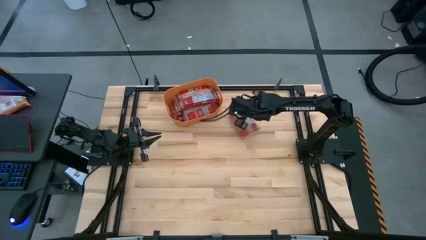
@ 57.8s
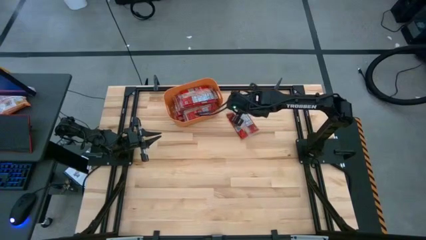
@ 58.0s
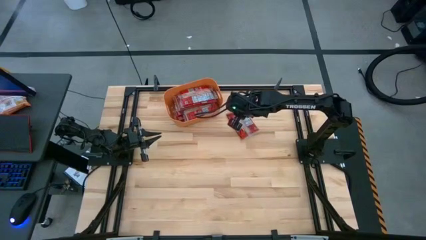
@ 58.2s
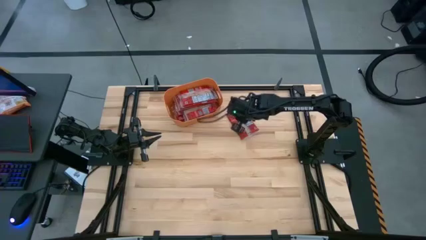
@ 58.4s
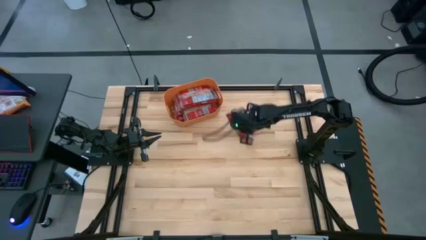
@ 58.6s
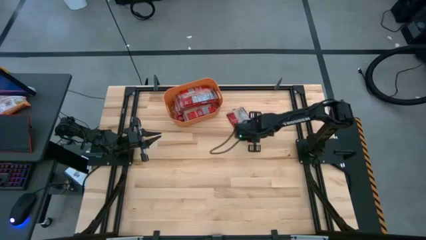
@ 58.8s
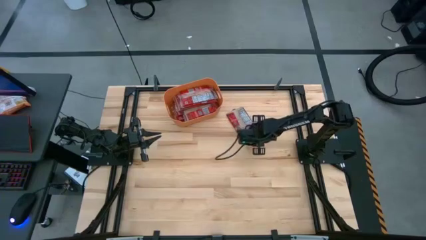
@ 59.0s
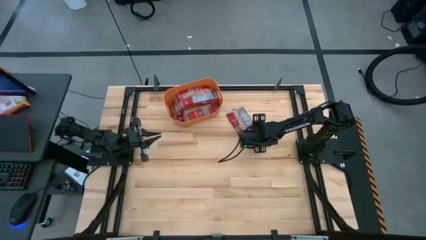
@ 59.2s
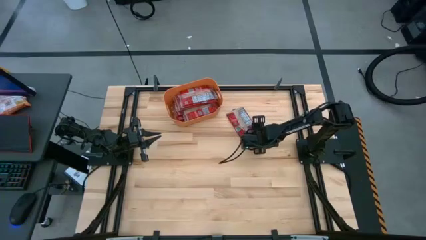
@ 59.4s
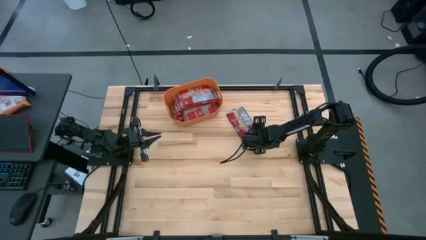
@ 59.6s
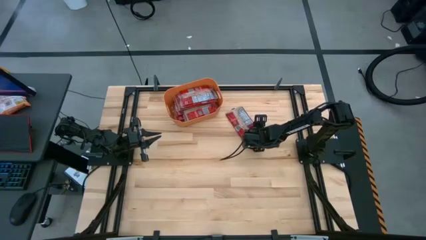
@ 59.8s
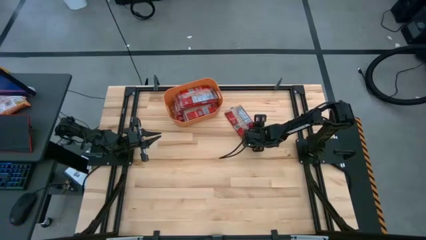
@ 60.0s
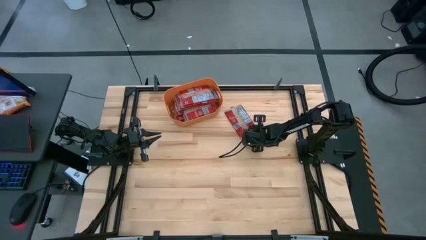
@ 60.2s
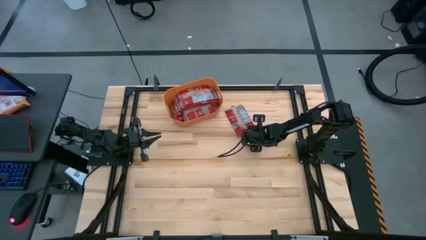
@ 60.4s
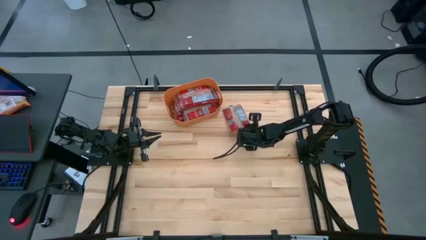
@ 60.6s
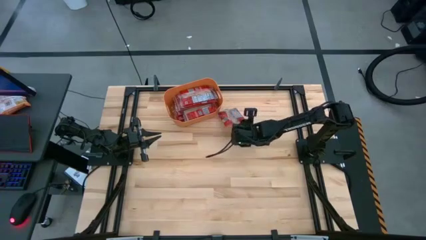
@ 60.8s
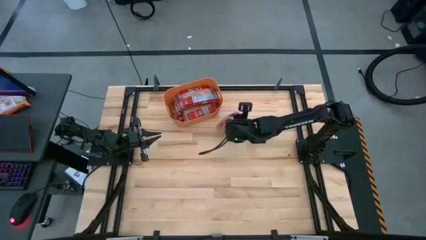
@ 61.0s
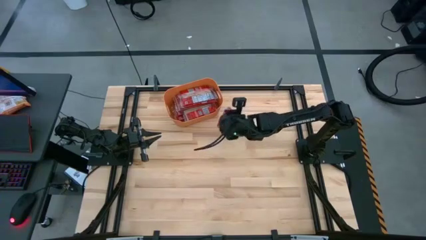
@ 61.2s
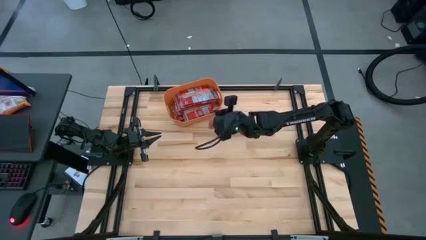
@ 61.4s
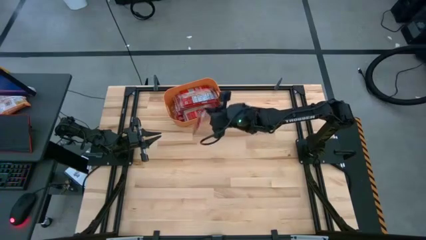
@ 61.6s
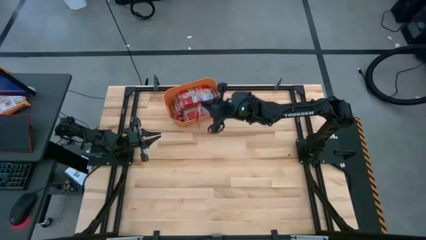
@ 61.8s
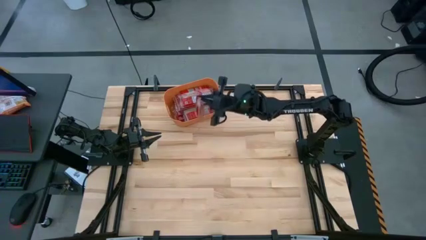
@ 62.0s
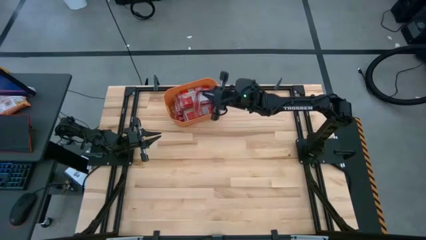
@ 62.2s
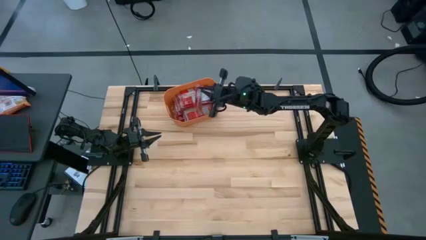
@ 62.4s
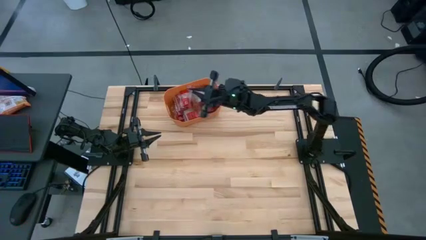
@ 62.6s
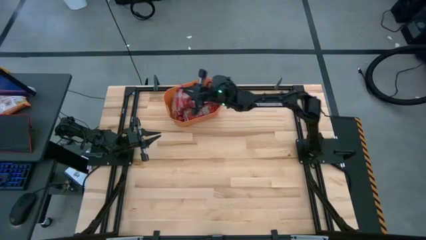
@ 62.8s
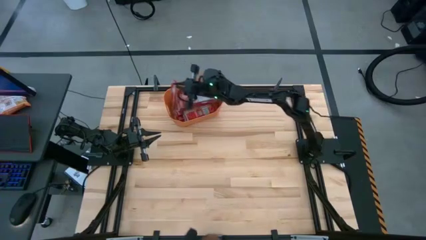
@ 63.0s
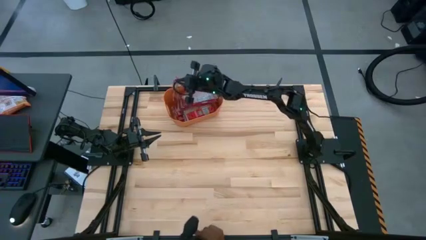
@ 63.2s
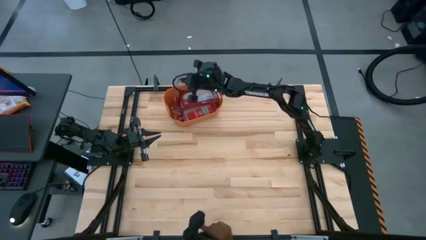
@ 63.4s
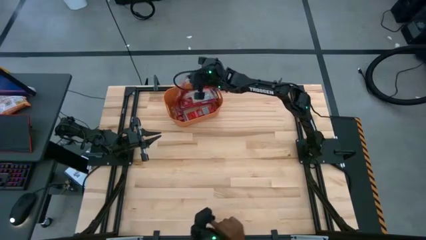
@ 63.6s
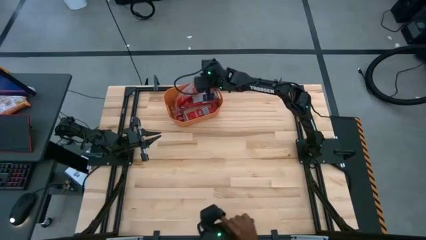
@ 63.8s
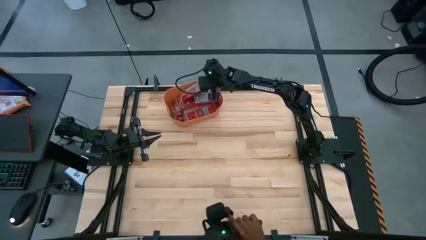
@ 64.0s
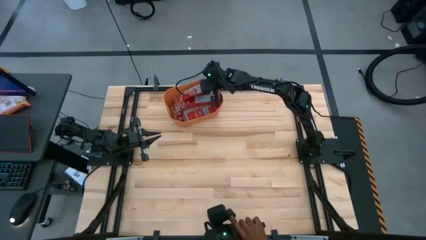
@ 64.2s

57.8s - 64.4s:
Task: Sort popcorn bags into baskets
Put the red popcorn bag into the orange bin

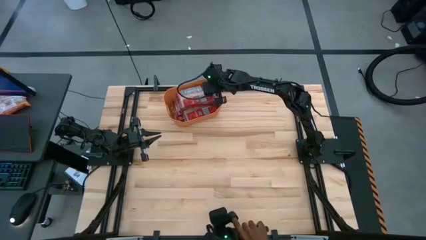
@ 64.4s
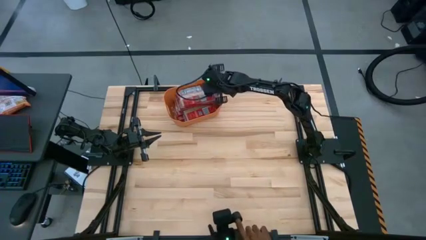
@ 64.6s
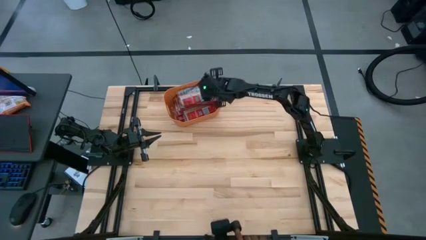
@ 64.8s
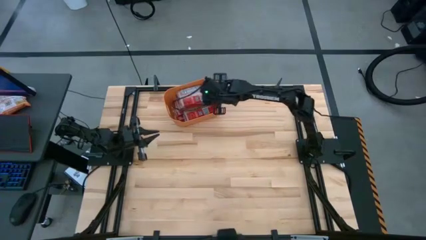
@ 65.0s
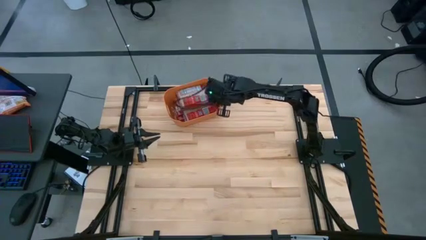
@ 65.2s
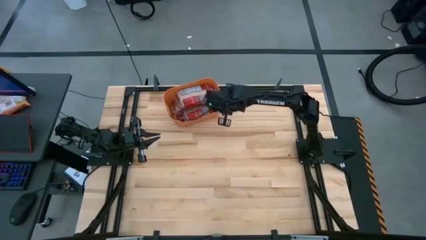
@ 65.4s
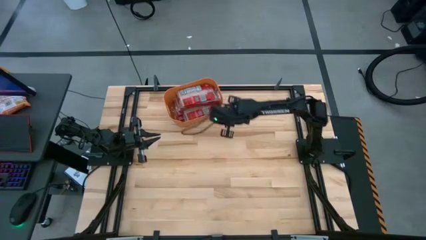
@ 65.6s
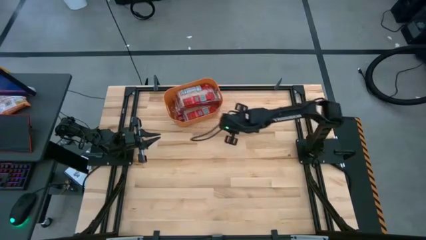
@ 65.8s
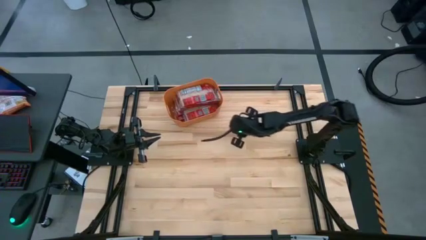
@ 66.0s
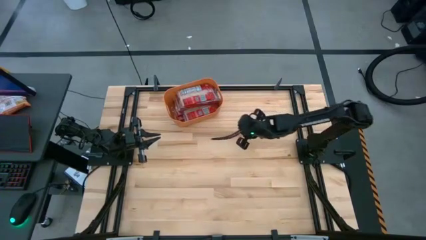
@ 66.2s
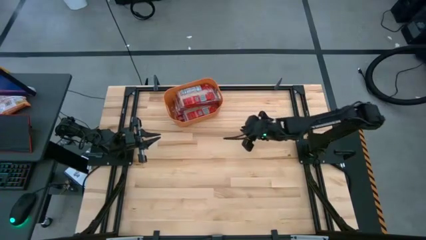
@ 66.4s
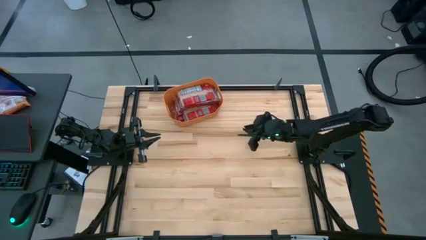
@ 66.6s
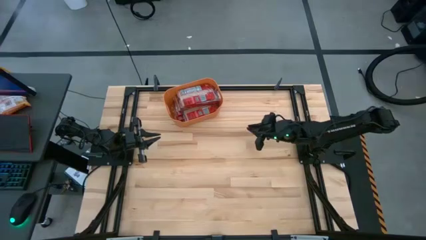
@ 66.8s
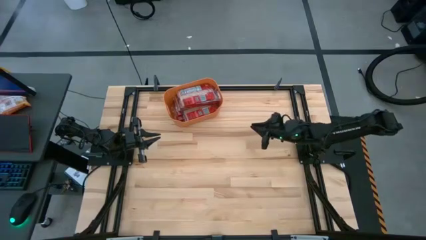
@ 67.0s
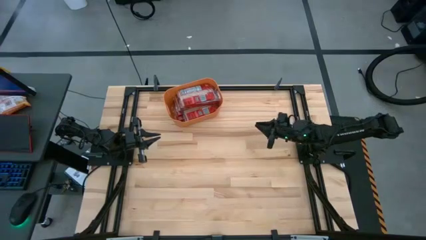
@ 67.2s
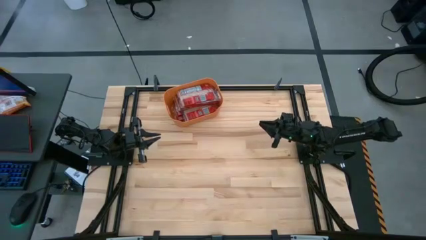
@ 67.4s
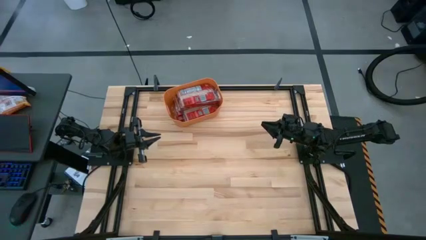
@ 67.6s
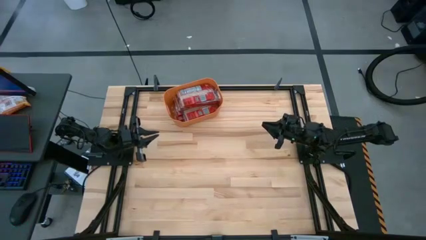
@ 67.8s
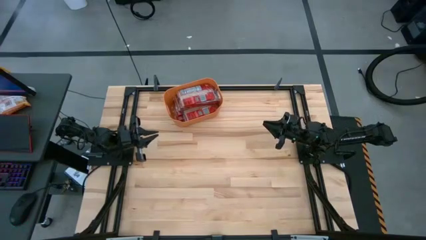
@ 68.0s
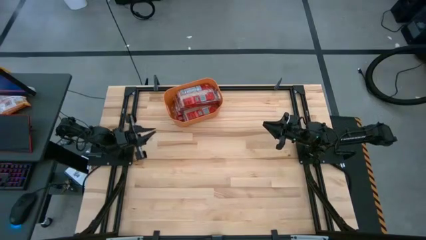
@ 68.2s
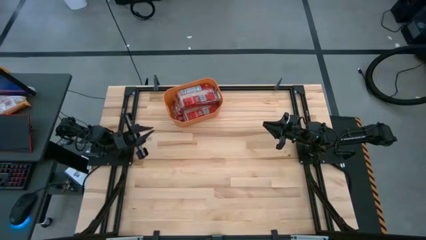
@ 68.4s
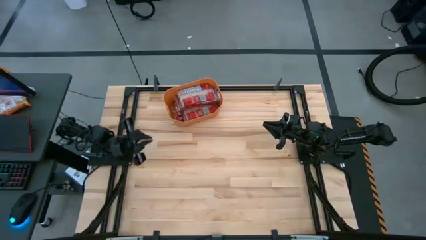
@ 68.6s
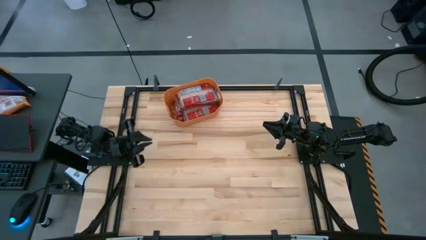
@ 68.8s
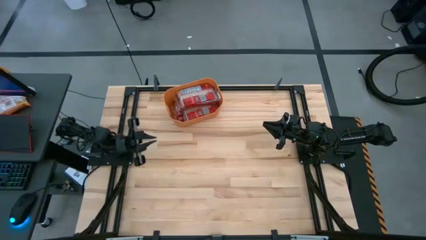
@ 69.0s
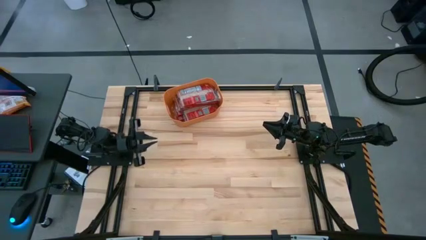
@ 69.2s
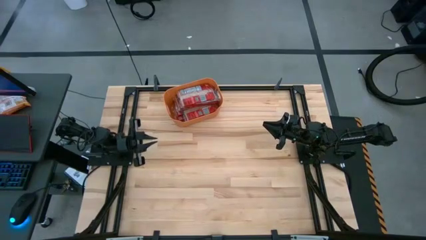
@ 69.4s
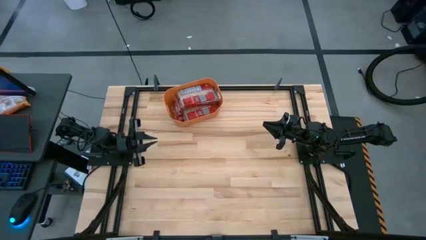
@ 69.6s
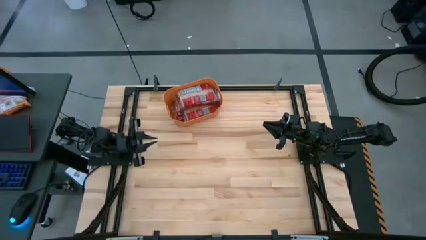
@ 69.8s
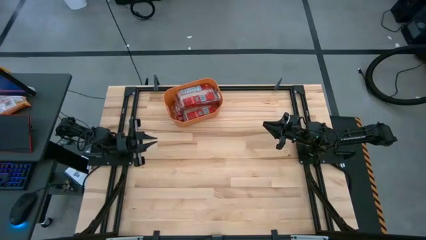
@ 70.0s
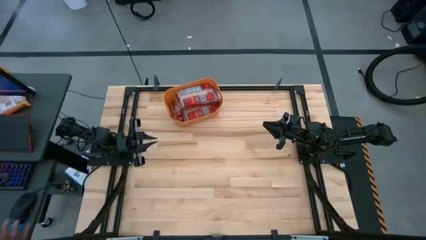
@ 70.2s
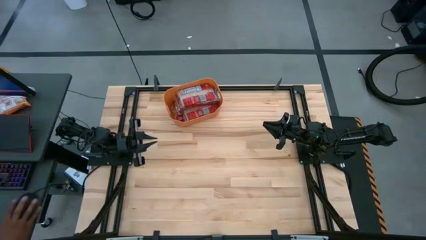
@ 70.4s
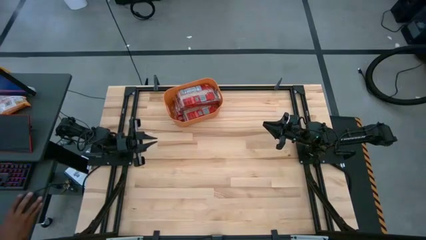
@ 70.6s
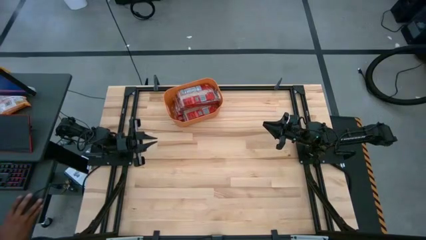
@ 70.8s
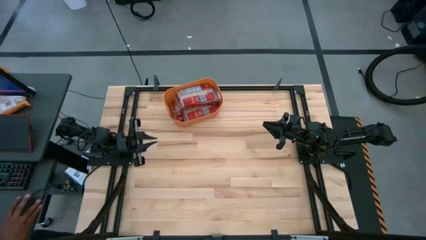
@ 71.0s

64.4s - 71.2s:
Return to Home Position

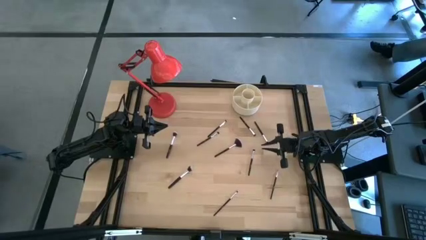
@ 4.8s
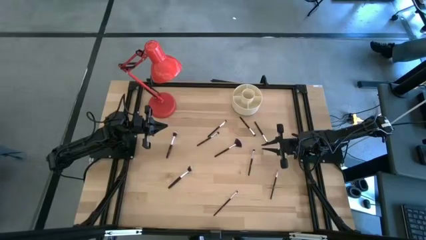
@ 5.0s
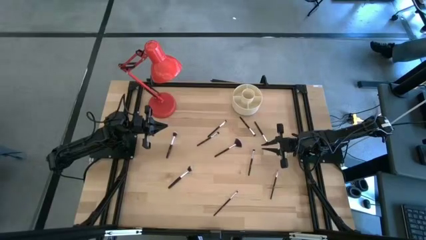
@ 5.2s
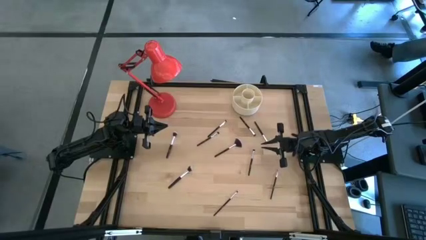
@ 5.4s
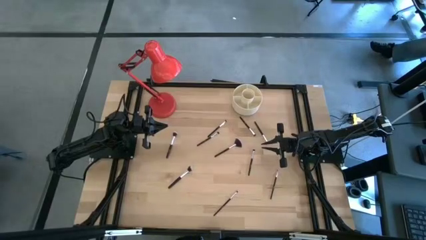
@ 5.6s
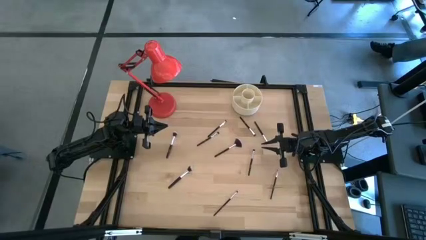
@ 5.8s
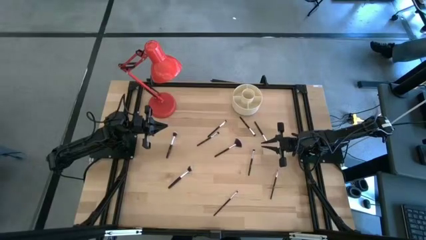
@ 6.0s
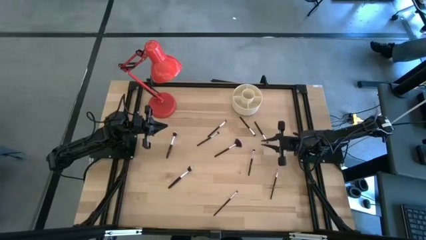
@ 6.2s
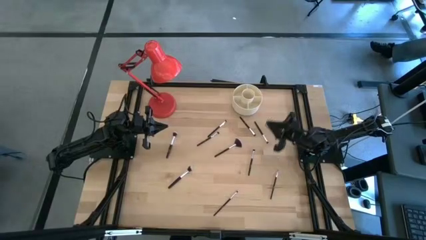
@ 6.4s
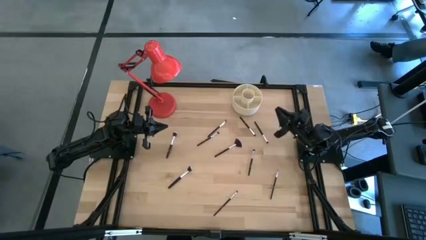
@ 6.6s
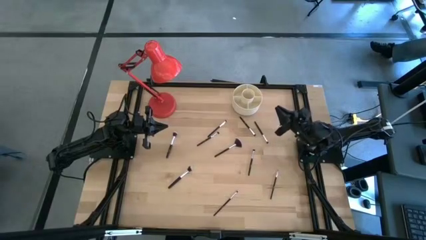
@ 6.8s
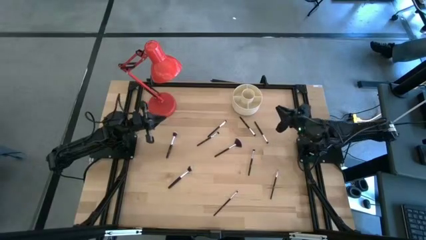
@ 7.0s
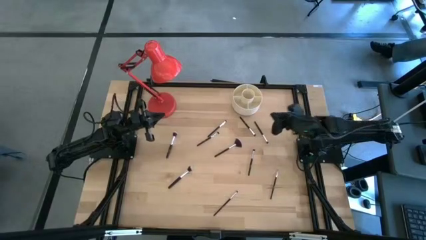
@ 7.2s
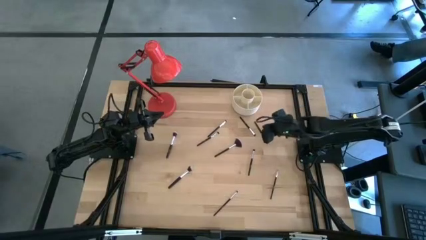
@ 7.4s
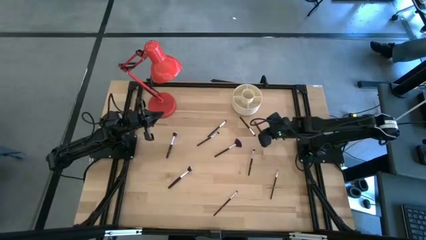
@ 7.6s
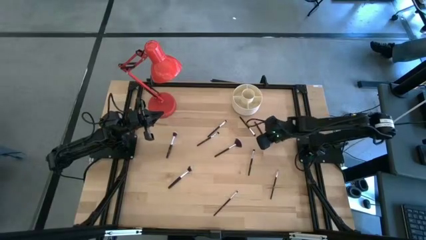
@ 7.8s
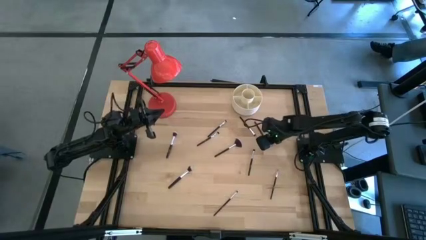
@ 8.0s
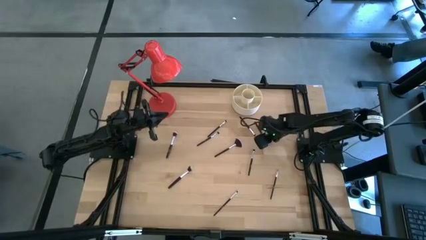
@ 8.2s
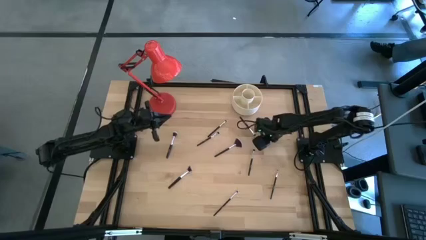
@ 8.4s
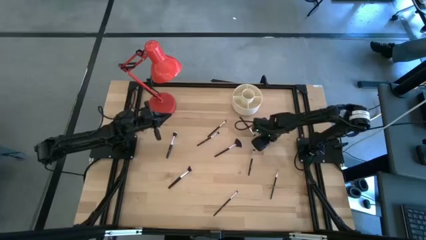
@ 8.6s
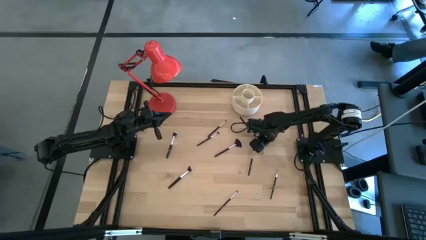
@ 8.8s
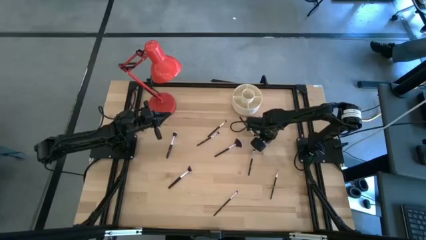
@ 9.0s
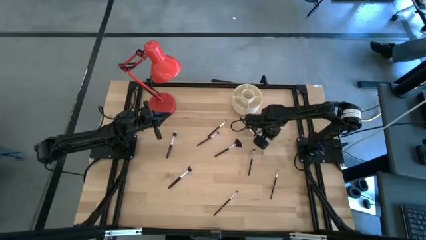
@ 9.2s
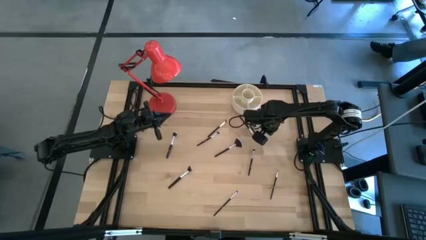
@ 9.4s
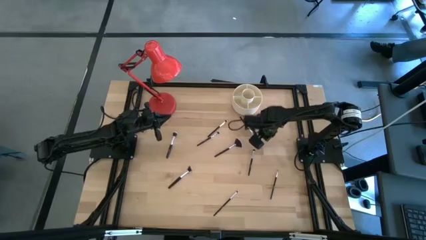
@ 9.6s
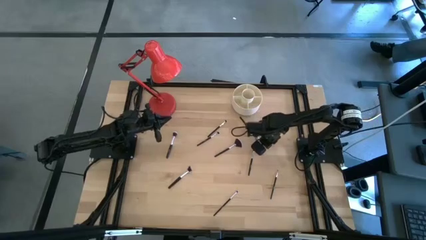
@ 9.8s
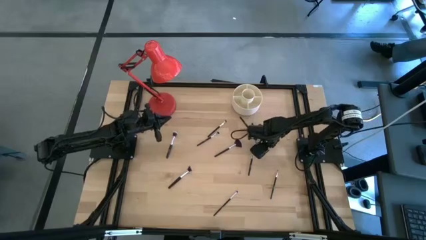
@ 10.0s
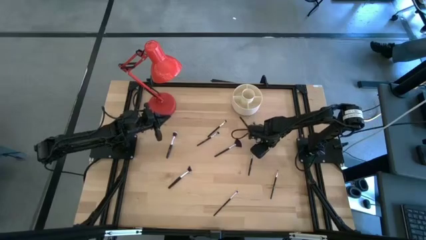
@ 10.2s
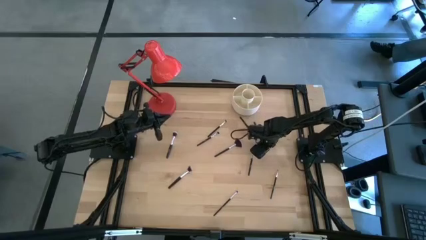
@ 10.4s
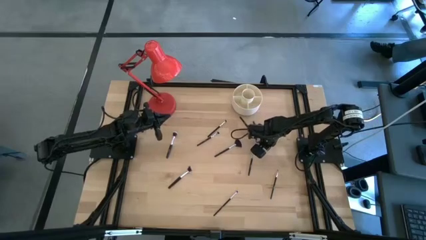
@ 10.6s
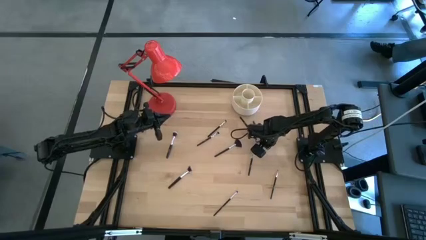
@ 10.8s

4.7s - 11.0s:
Task: Put items in baskets/containers
Put the black eyeshadow brush into the white organizer
